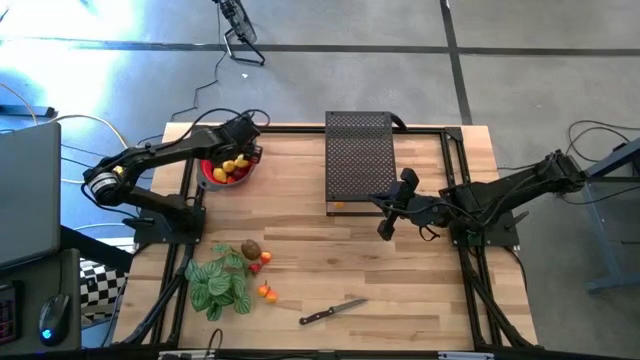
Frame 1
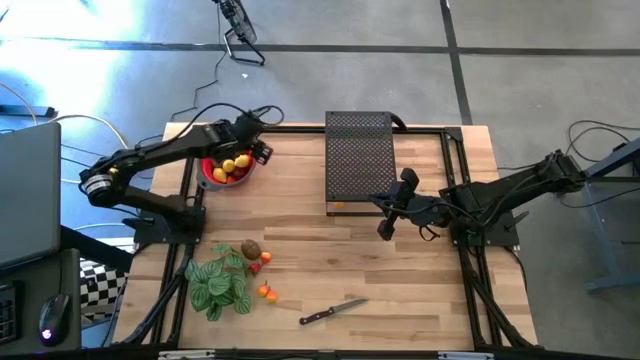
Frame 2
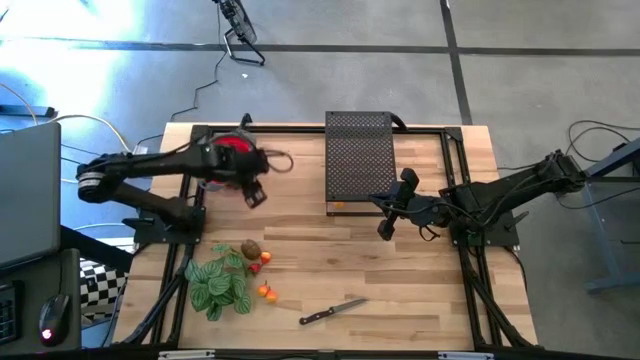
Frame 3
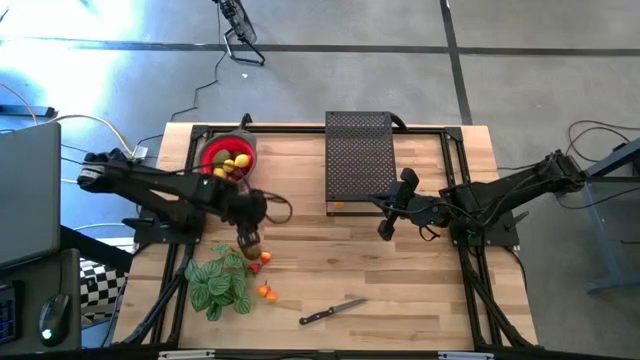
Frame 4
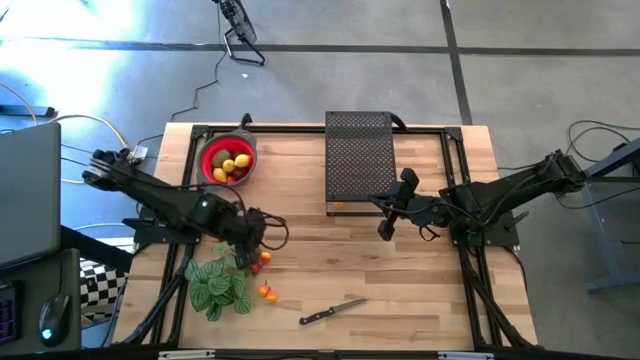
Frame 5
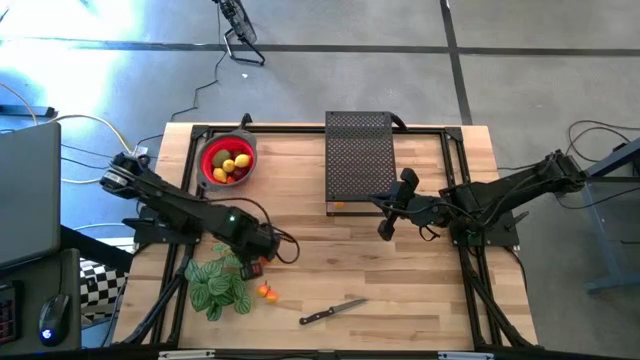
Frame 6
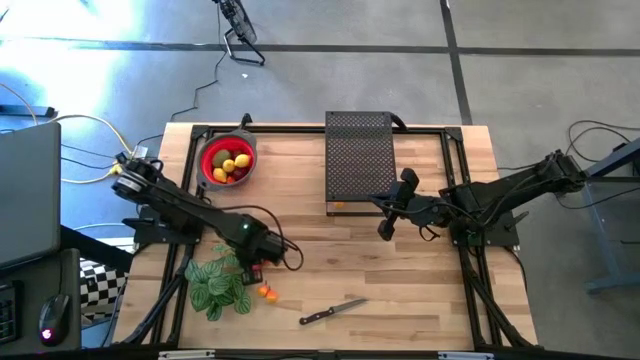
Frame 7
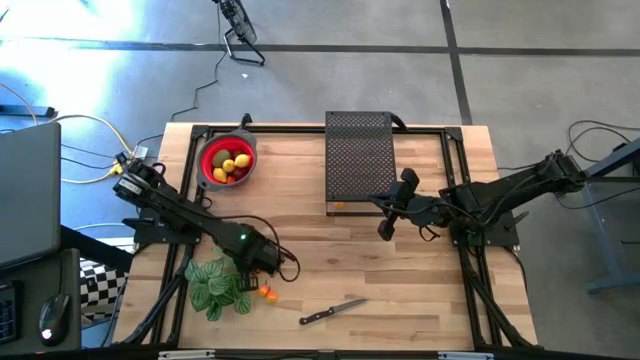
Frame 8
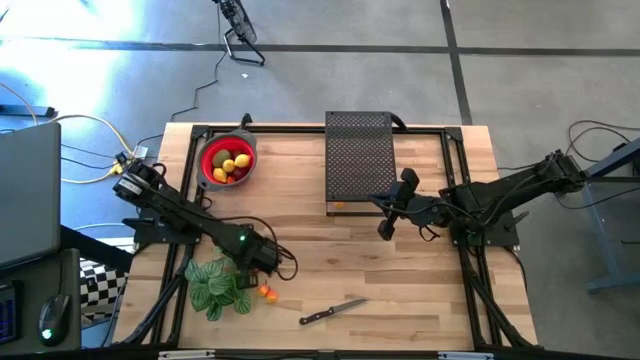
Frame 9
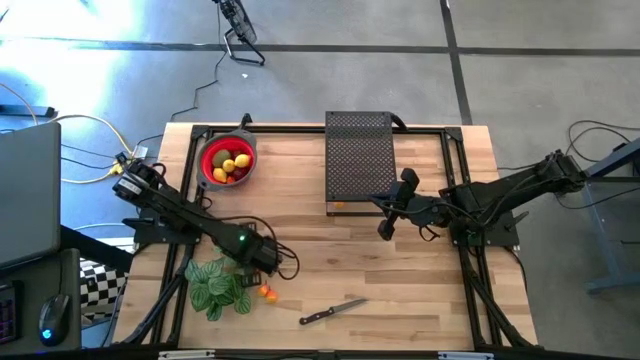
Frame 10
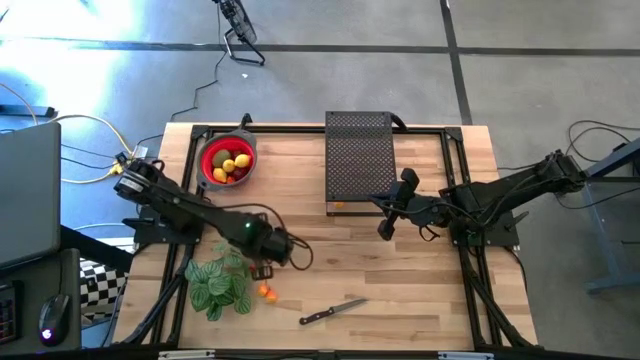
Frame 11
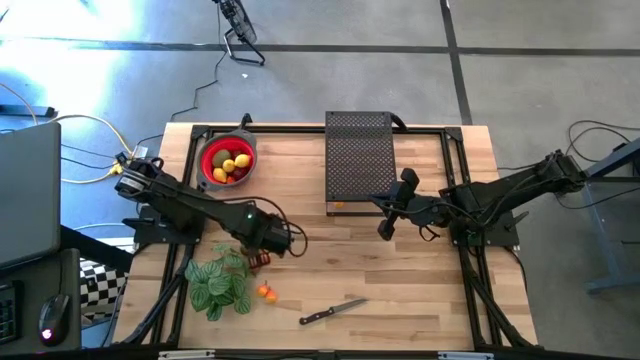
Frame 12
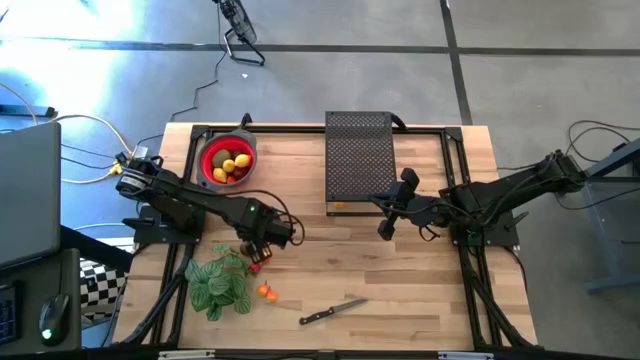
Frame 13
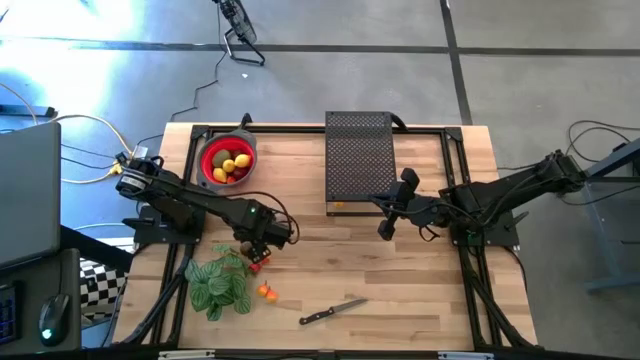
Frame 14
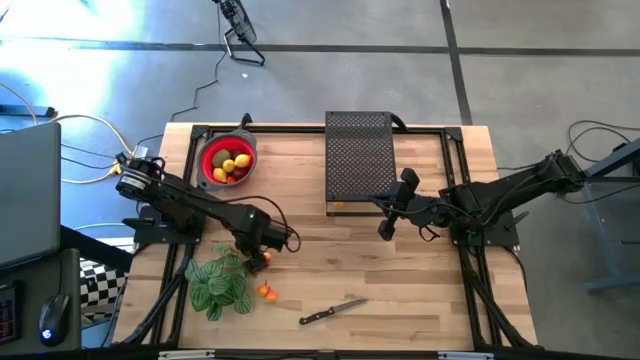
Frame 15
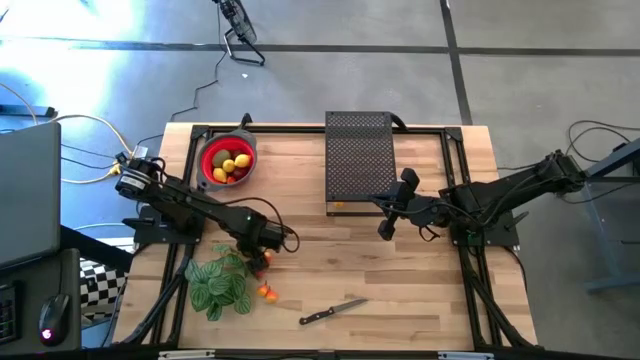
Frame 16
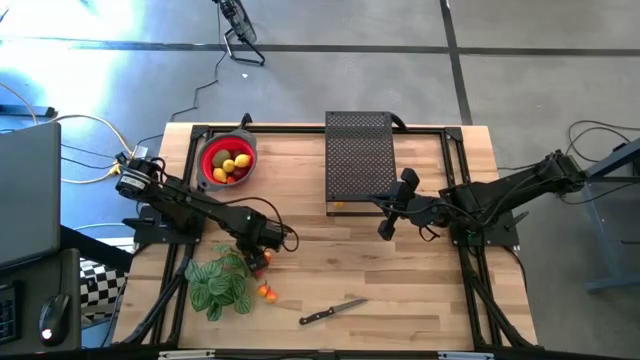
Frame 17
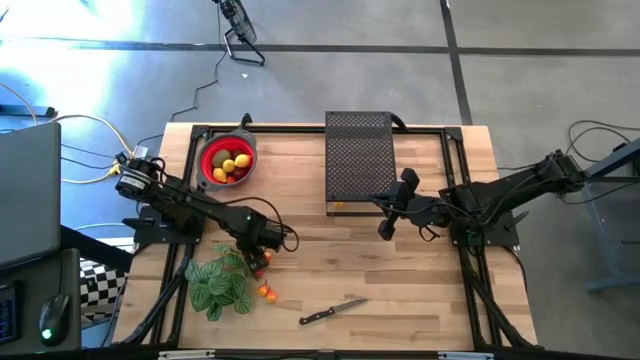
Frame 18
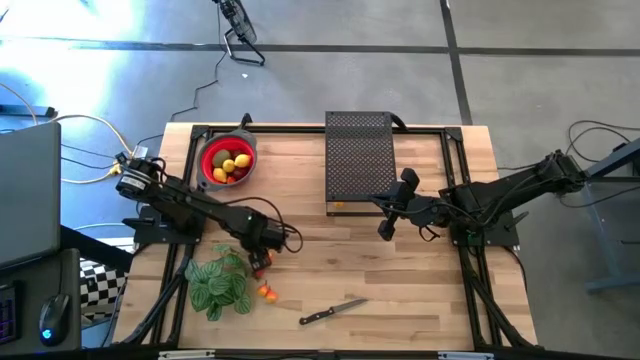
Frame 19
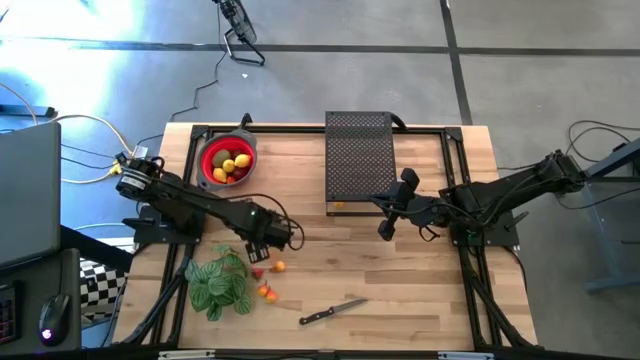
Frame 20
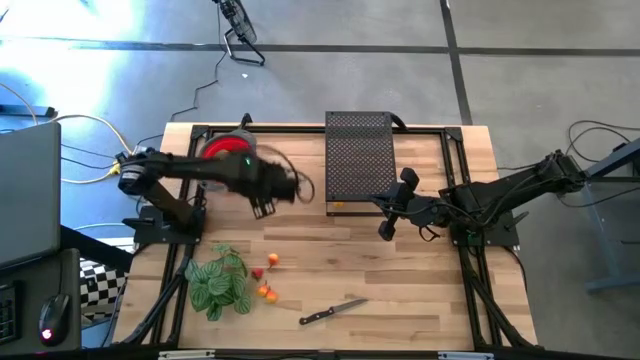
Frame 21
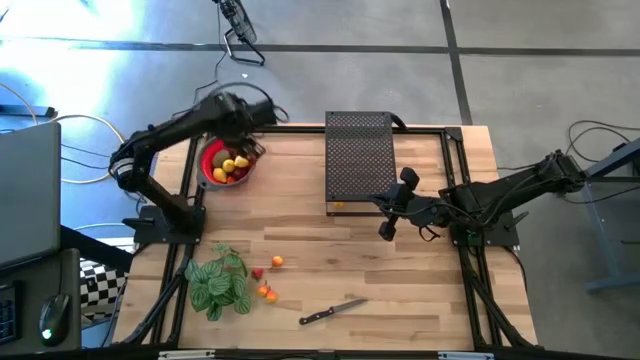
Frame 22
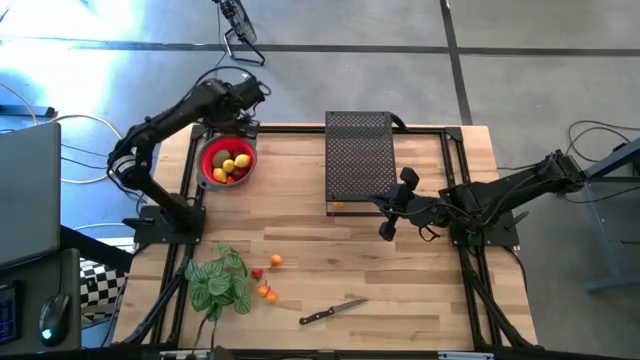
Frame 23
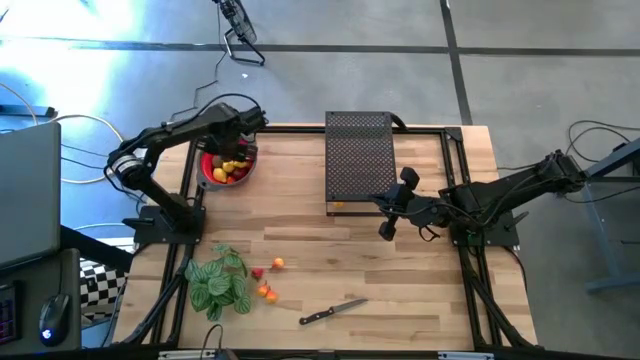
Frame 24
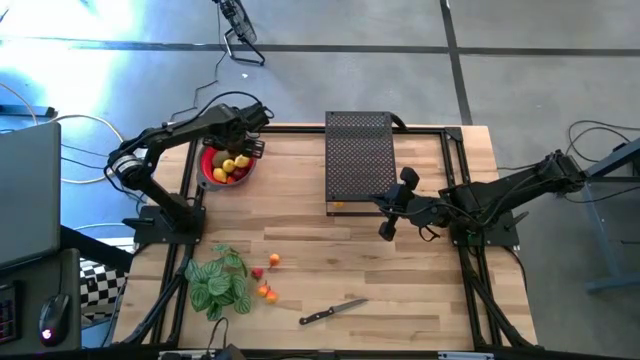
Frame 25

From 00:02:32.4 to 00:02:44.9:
Task: Pick & Place Fruit
Put the brown kiwi into the strainer bowl

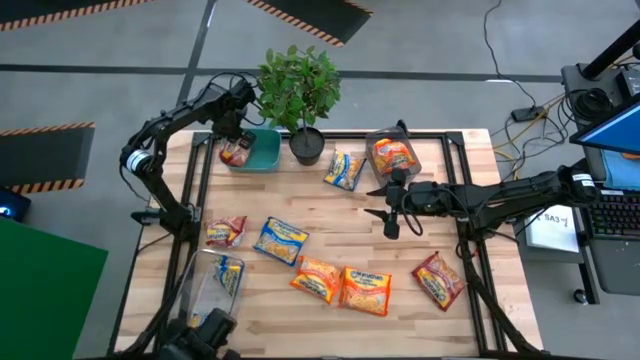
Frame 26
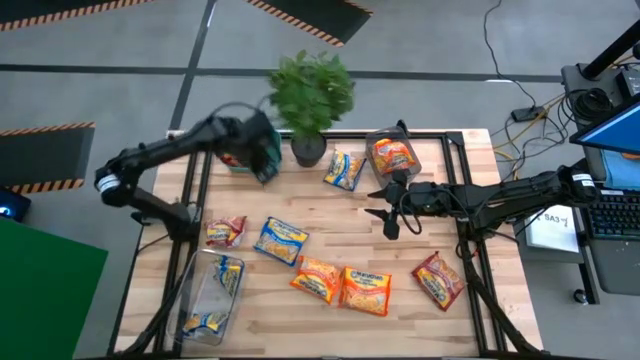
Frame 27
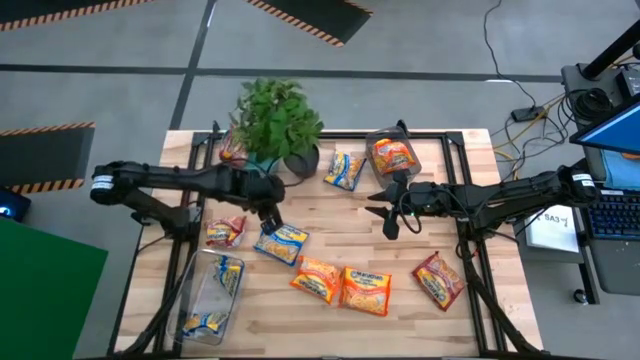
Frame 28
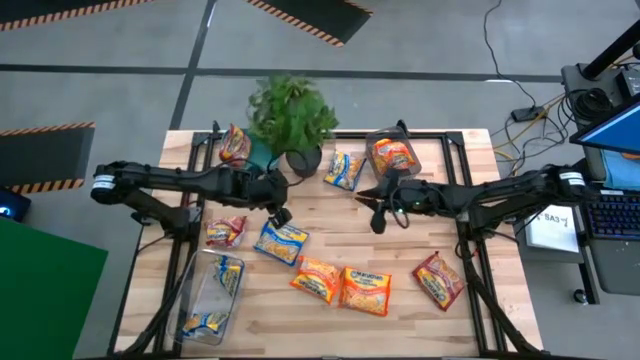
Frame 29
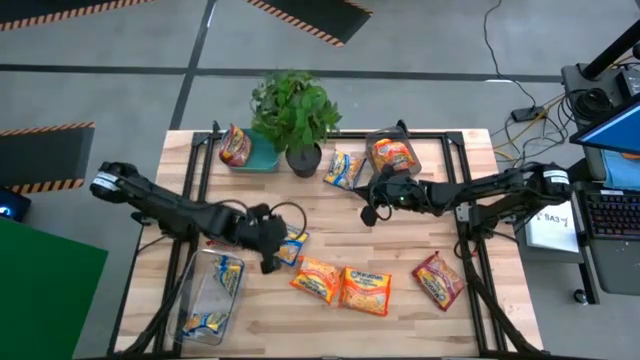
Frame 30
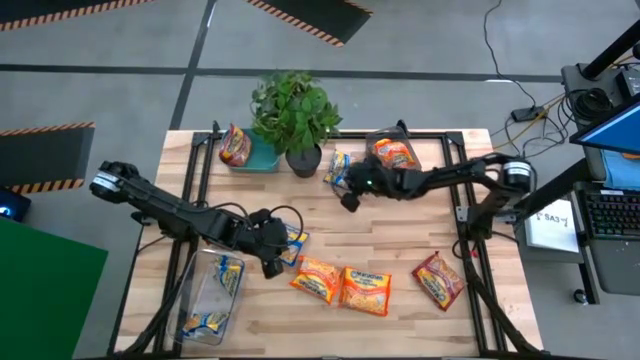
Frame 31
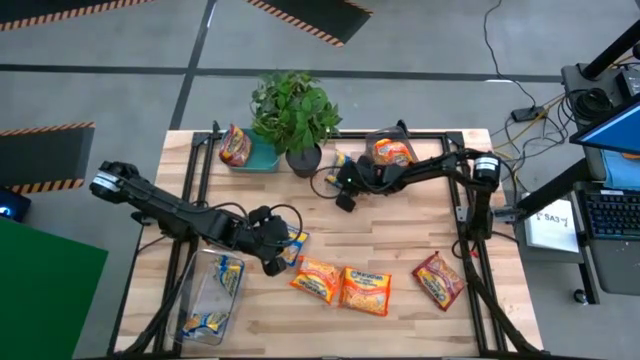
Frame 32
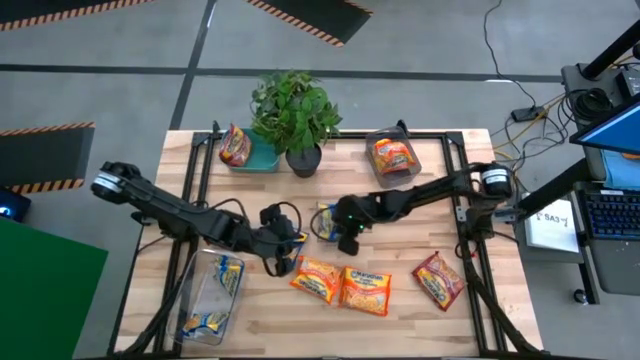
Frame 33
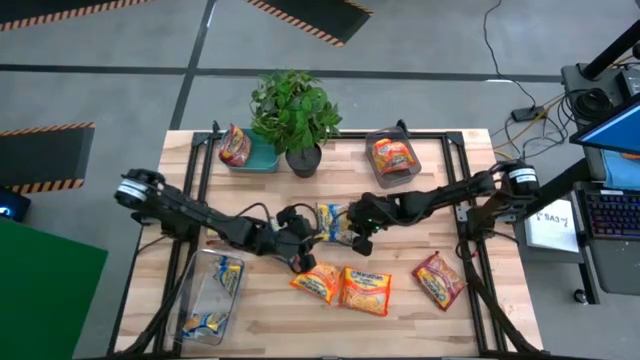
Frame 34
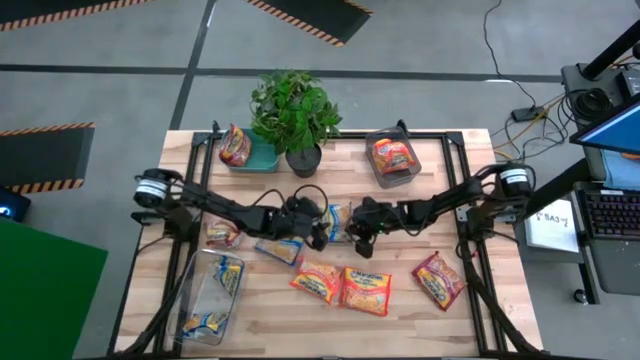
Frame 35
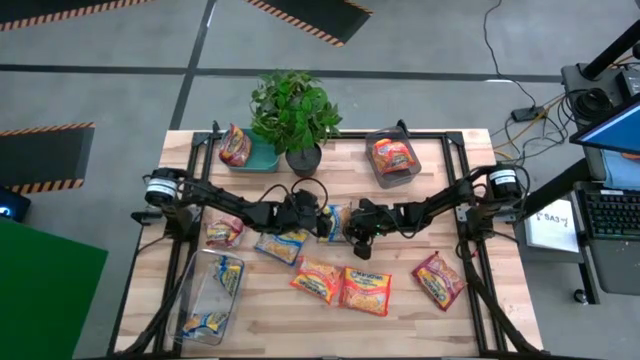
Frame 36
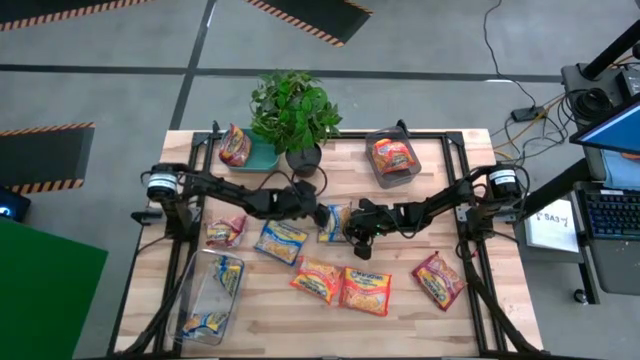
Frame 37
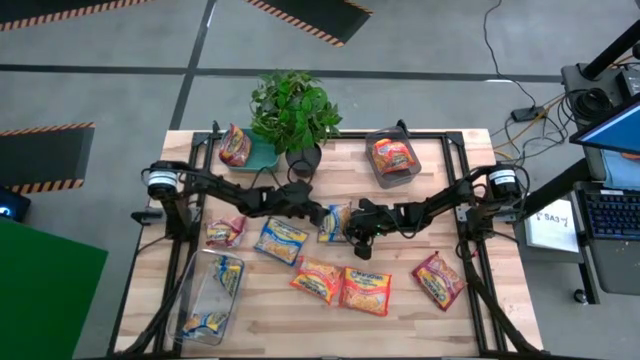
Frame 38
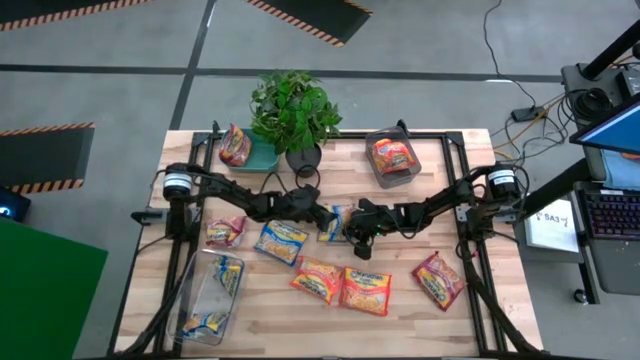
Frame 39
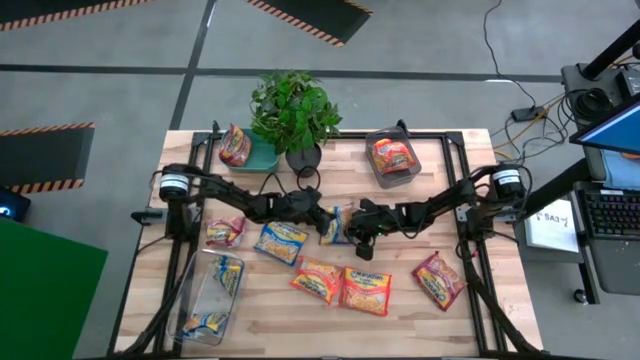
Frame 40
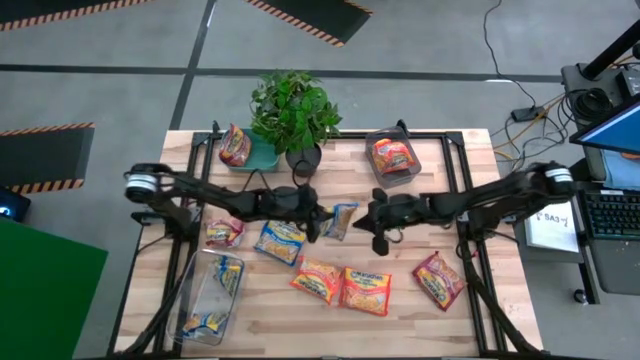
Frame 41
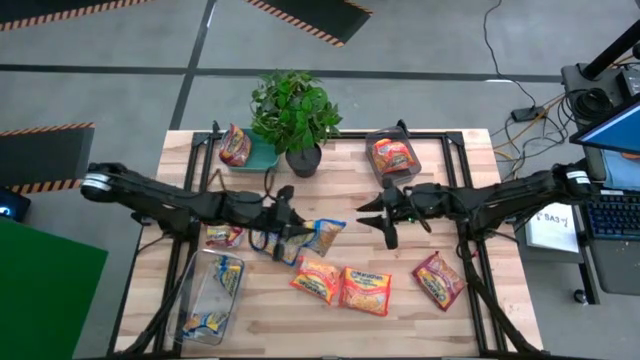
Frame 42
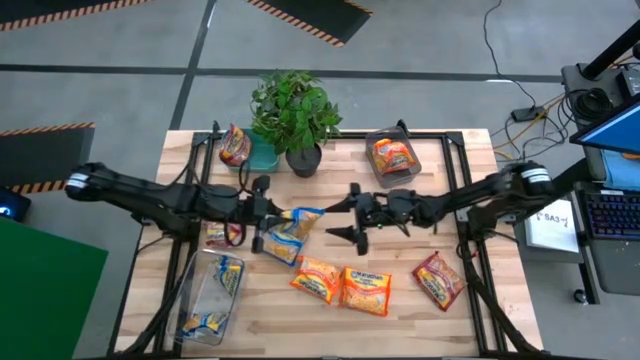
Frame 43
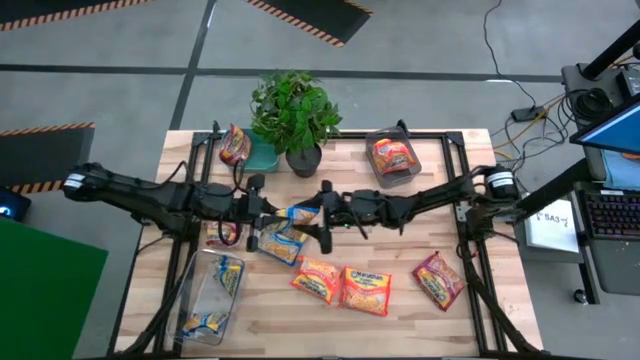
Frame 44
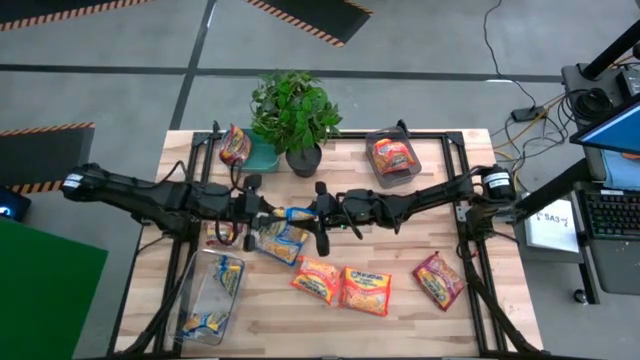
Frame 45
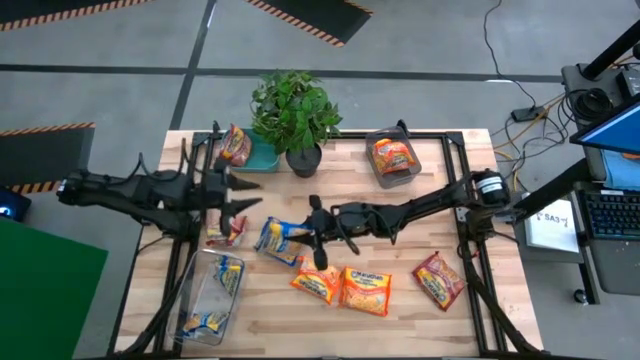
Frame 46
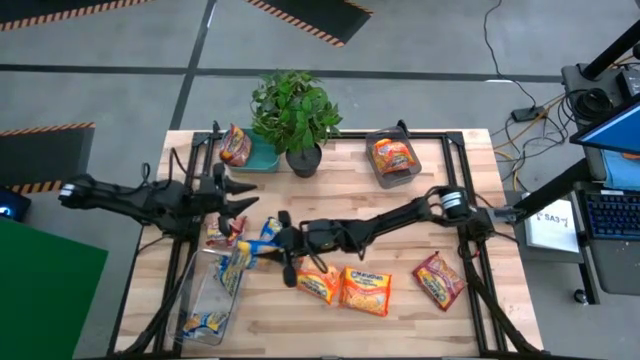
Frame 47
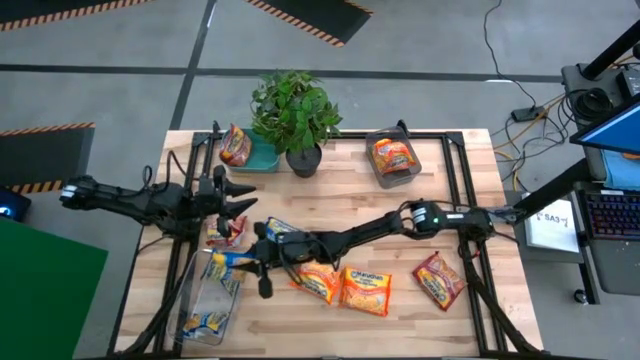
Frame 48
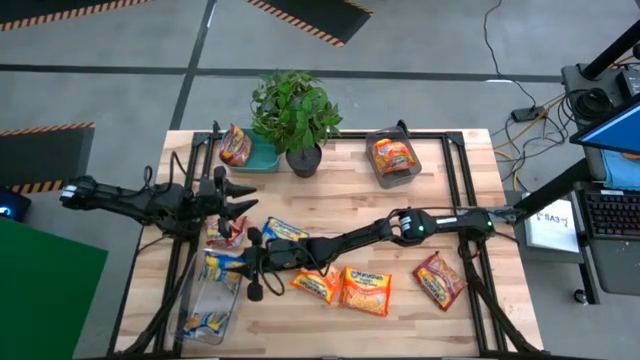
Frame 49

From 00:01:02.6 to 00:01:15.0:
Task: Sort Maruchan noodles
Put the blue noodle pack into the transparent bin
